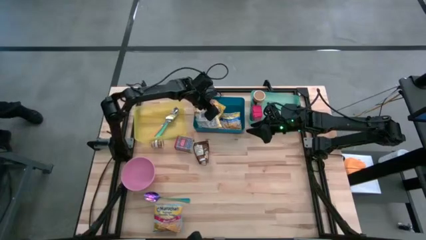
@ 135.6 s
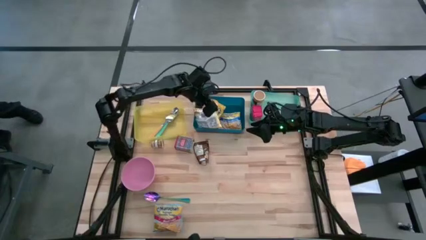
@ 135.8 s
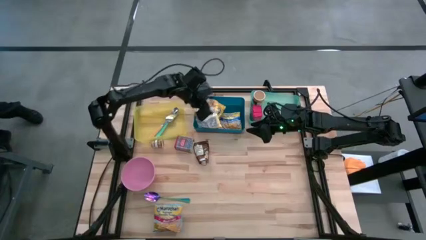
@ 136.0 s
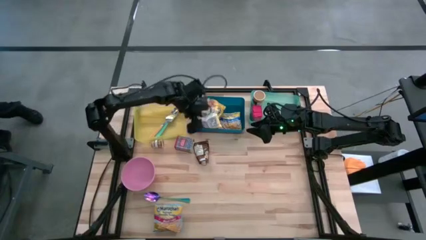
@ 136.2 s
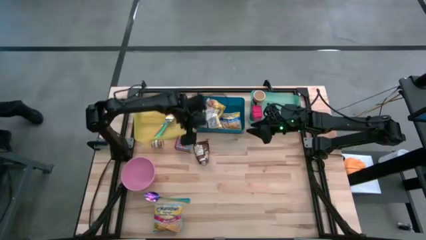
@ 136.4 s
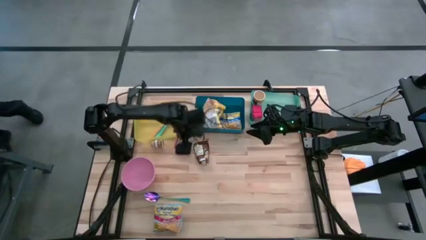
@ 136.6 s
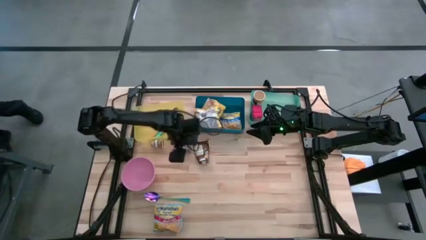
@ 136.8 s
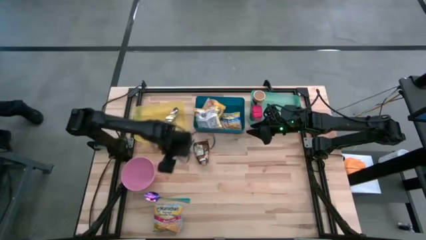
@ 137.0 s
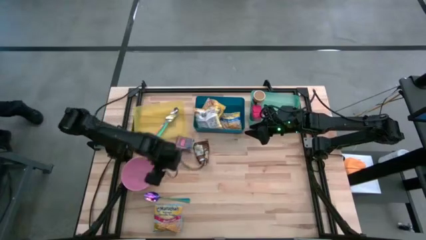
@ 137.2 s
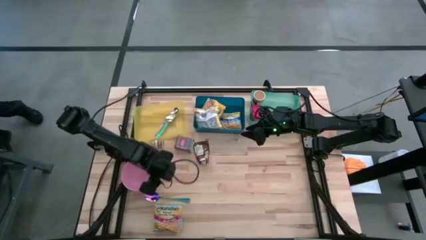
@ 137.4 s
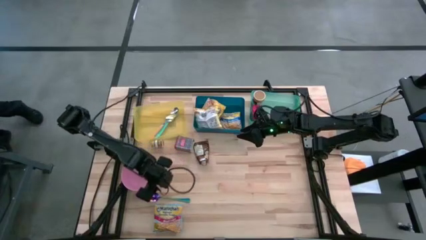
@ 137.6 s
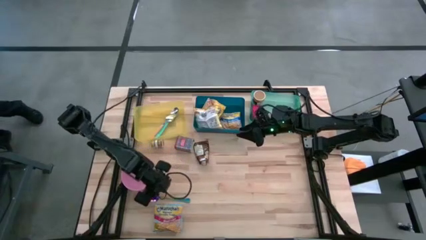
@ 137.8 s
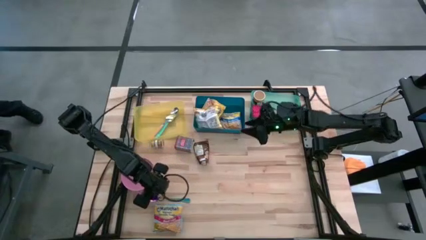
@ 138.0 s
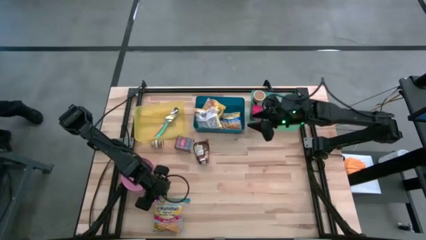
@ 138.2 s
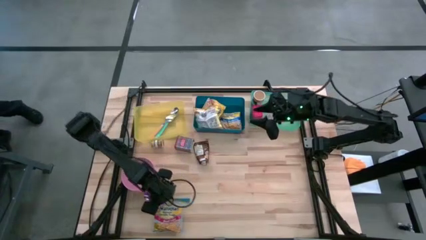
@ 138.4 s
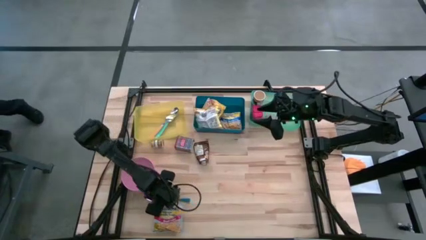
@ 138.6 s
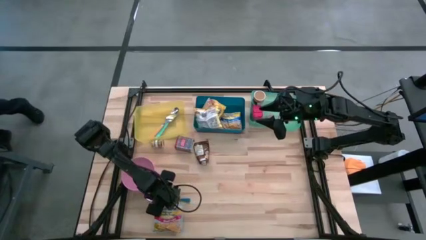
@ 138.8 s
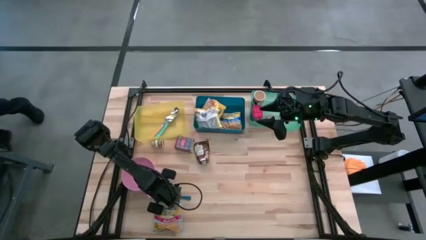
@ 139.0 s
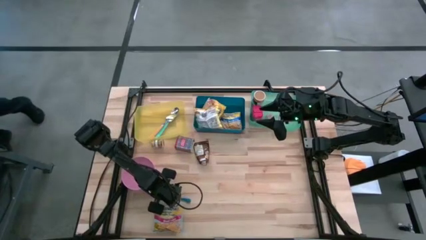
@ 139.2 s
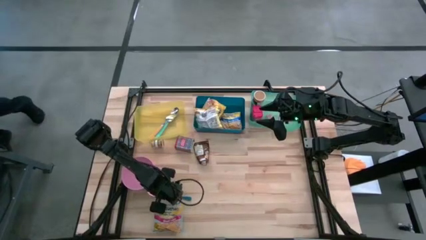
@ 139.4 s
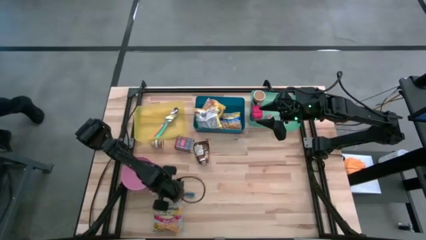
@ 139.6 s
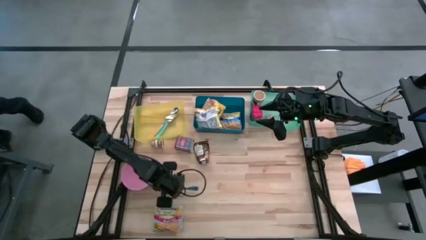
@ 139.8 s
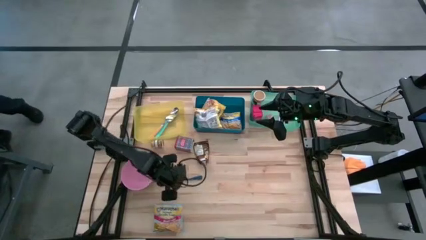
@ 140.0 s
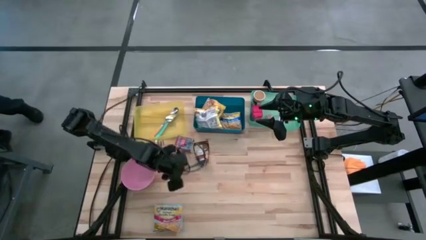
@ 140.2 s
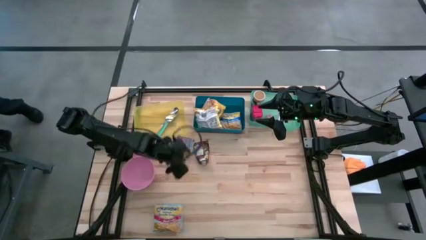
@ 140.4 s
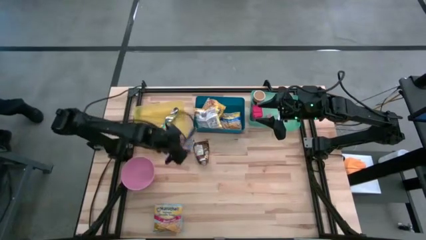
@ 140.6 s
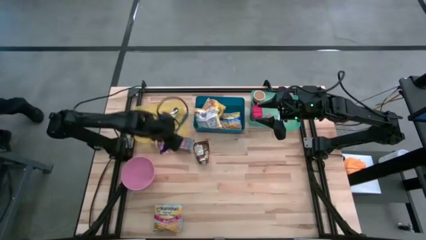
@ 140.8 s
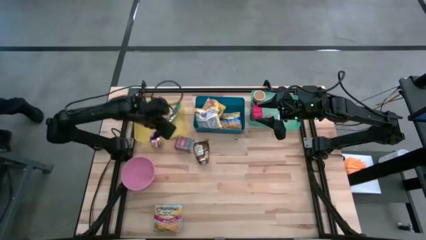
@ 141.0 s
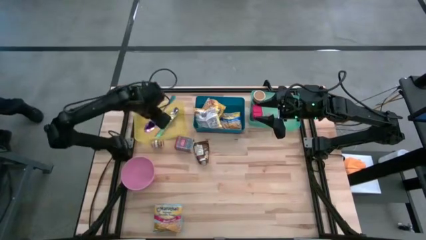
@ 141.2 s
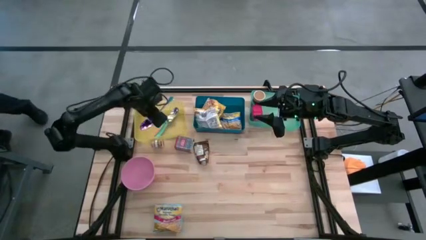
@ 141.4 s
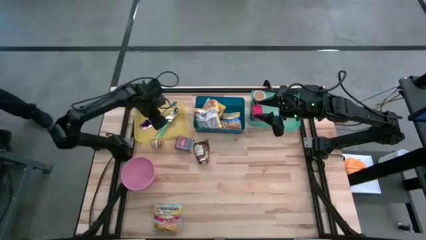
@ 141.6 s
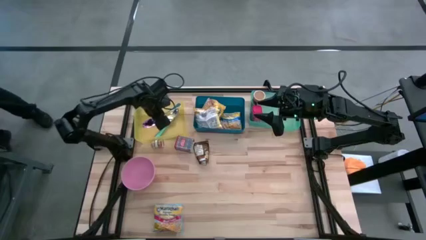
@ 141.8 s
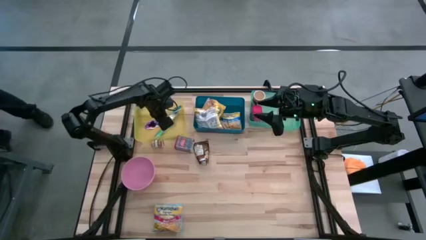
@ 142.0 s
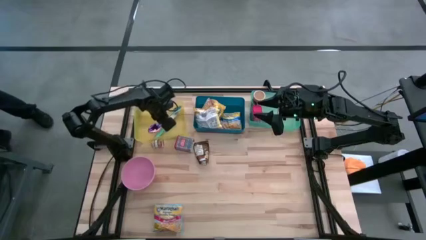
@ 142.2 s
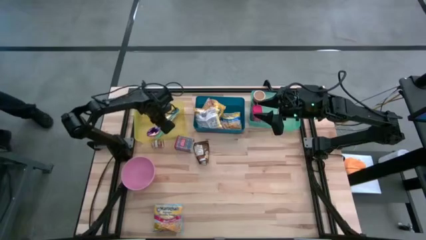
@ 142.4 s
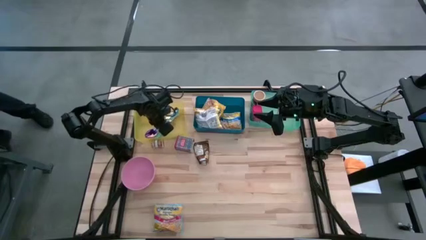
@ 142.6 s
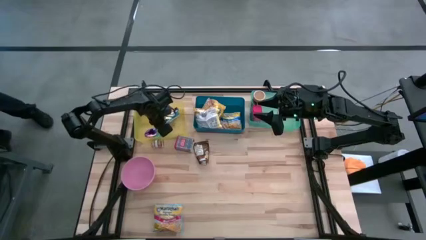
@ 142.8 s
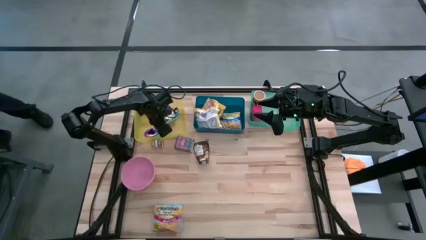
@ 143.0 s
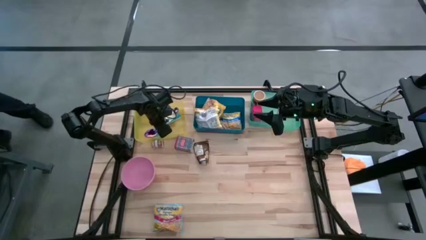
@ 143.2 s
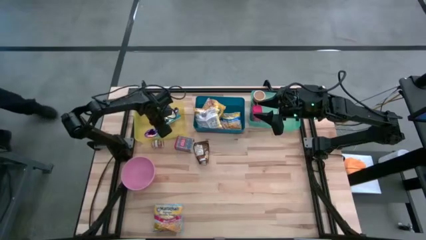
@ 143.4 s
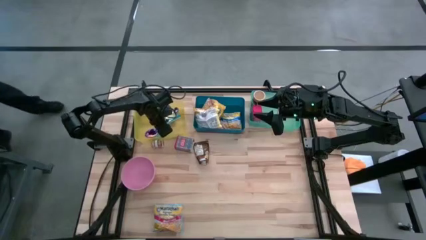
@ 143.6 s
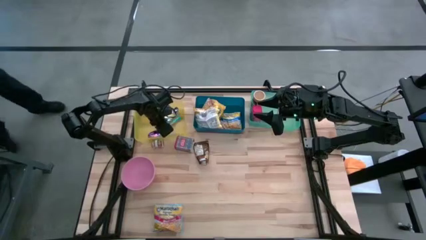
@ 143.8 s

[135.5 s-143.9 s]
Put the purple spoon into the yellow transparent bin

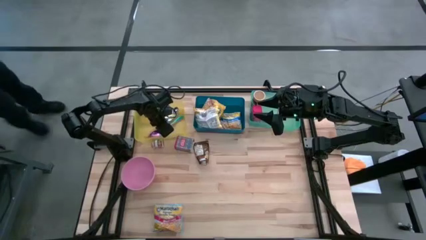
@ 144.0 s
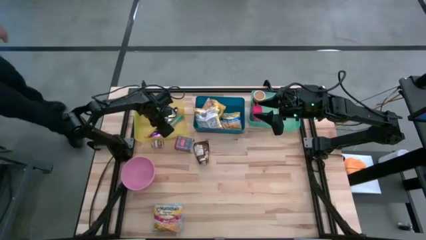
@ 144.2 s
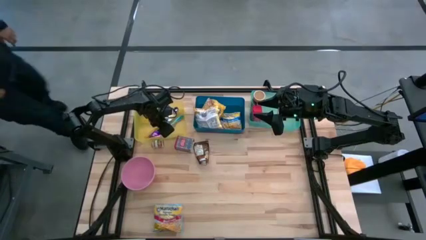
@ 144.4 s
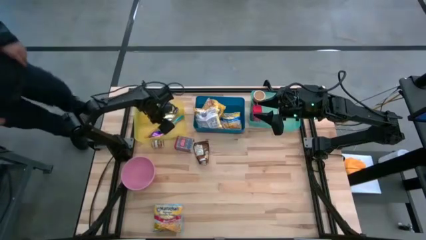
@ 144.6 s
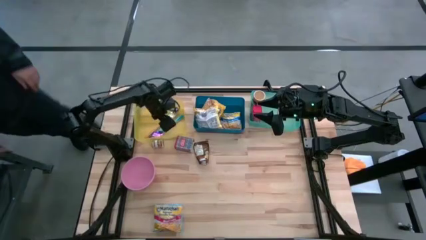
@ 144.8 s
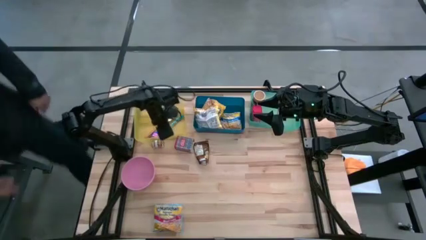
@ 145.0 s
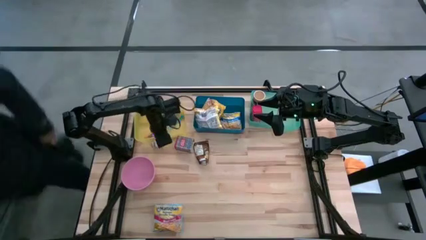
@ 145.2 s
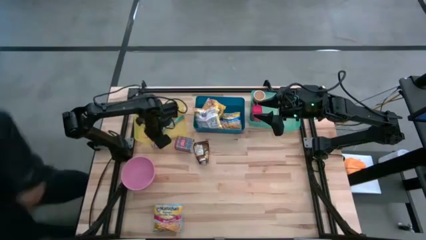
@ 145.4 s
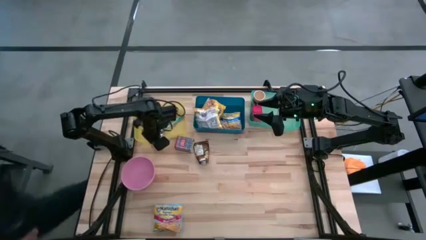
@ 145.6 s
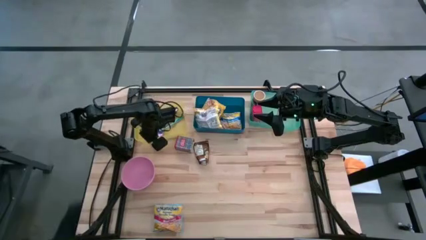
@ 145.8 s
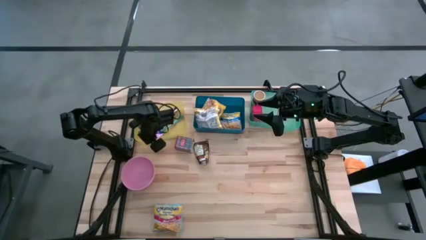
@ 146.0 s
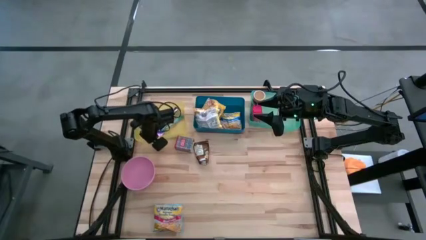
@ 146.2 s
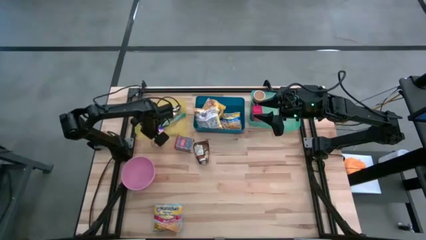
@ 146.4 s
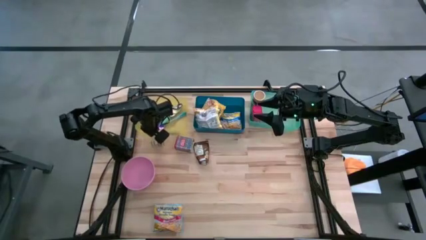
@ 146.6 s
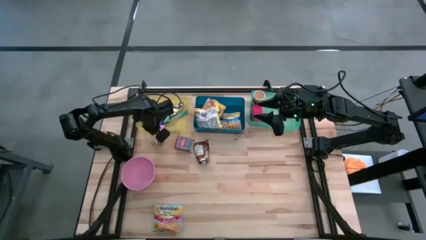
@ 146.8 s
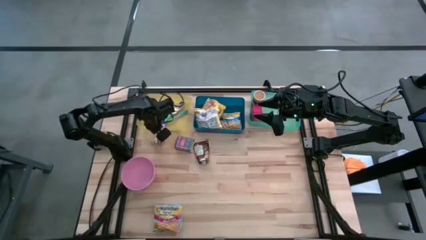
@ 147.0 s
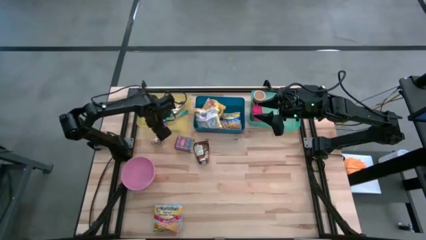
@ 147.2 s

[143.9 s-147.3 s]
Adjust the yellow bin

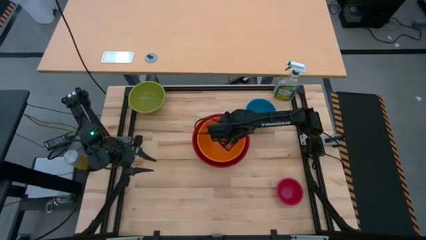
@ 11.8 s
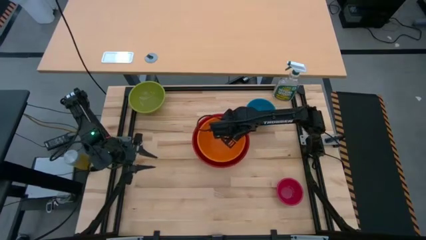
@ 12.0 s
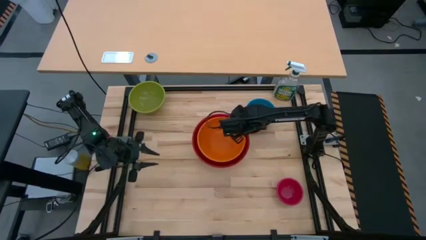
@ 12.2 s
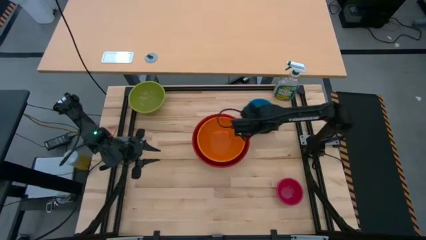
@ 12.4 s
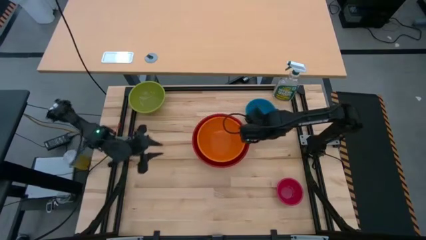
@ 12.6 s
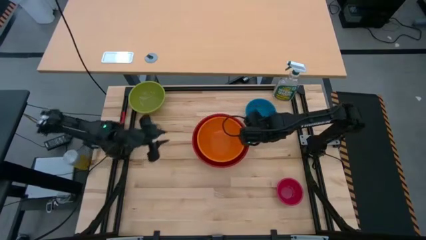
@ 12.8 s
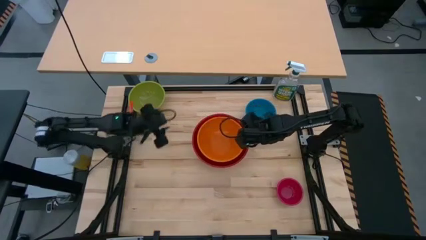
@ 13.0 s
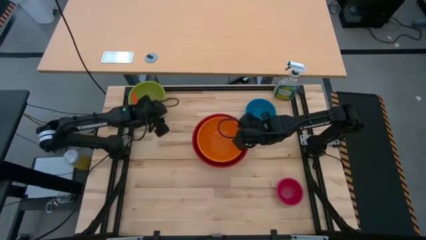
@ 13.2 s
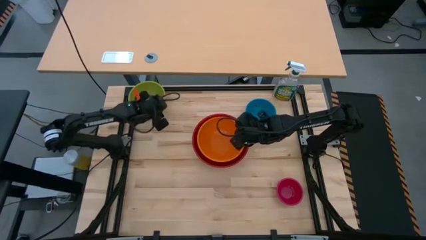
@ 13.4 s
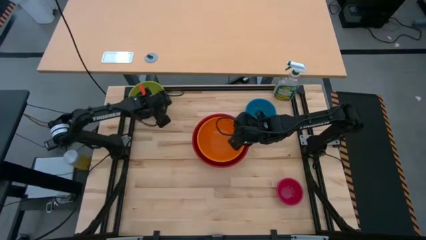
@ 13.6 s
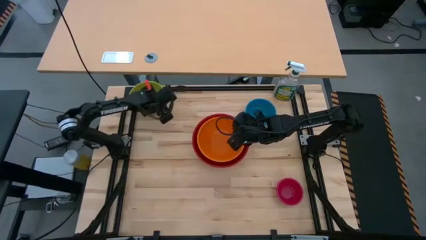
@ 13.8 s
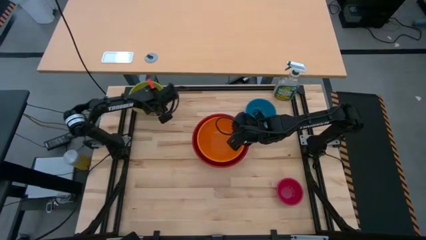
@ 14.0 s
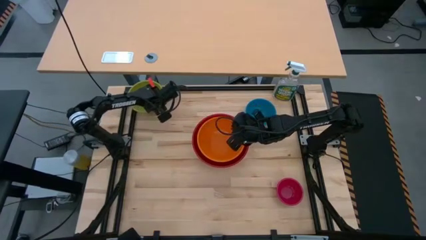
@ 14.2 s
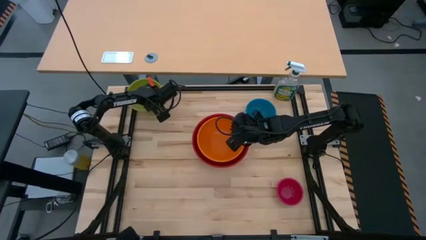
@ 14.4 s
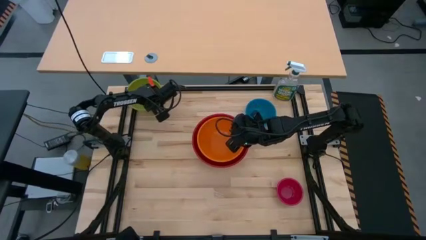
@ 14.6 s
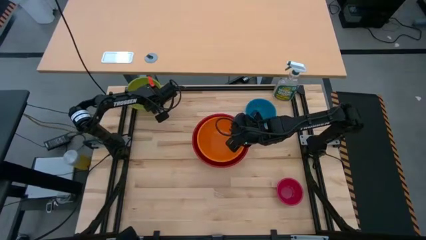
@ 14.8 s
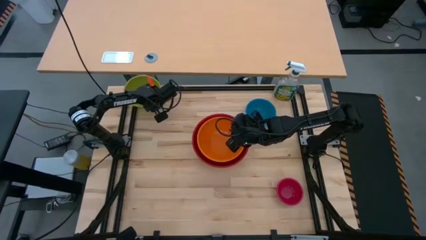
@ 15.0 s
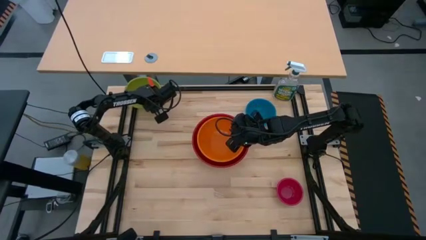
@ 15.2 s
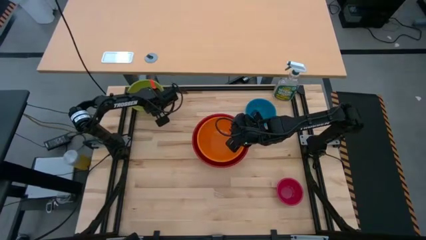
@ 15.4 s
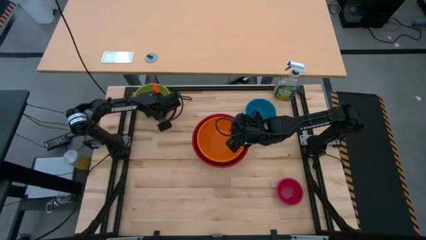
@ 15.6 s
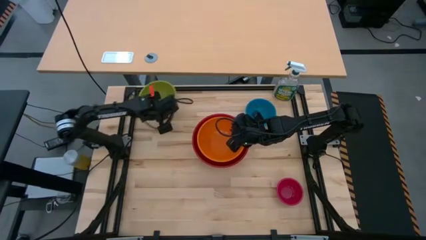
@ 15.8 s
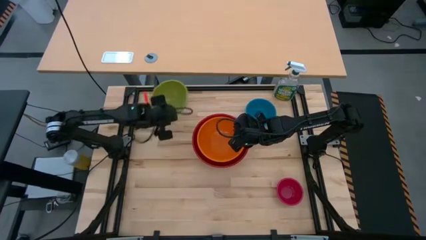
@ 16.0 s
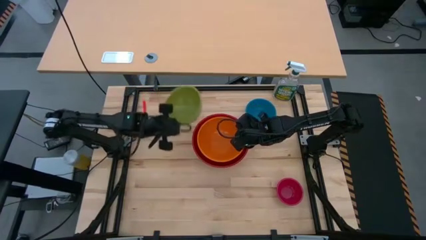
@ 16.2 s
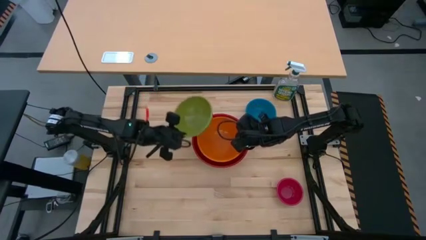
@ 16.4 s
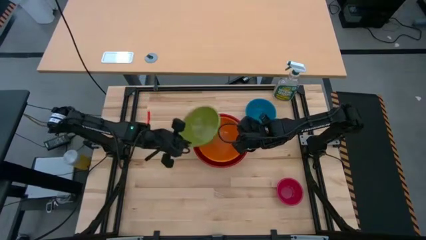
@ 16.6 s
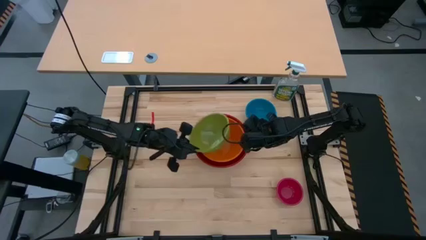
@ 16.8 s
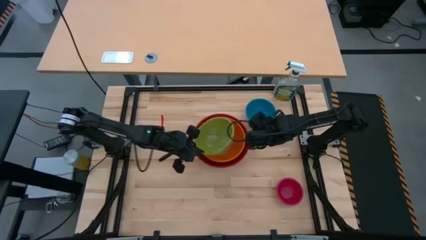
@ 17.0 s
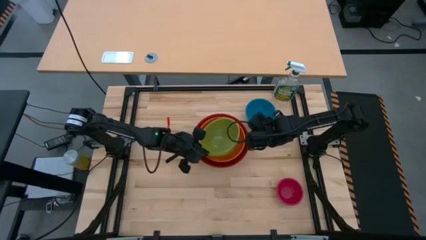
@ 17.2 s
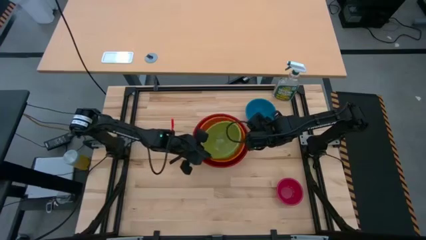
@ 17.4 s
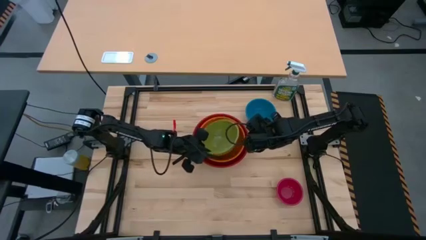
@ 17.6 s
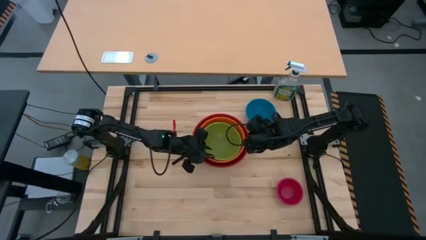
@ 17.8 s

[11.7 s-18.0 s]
Stack the green bowl on top of the orange bowl
